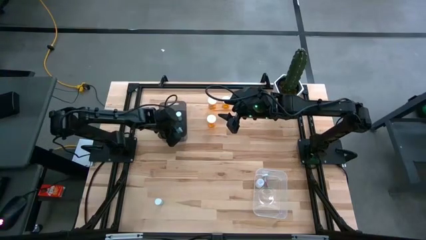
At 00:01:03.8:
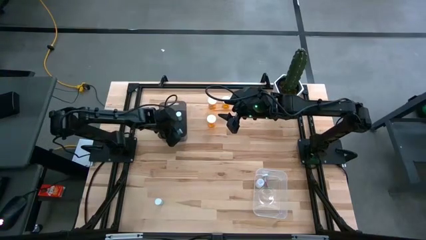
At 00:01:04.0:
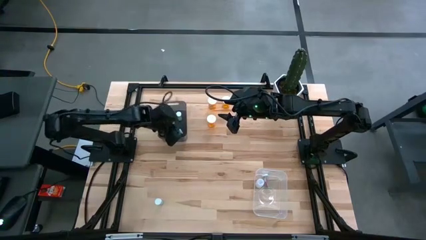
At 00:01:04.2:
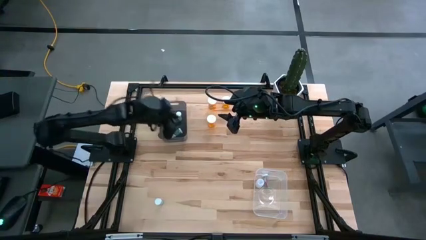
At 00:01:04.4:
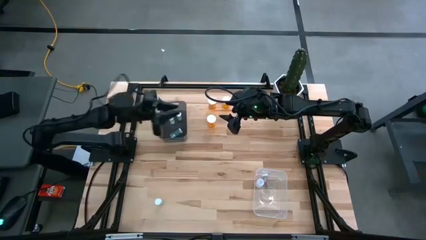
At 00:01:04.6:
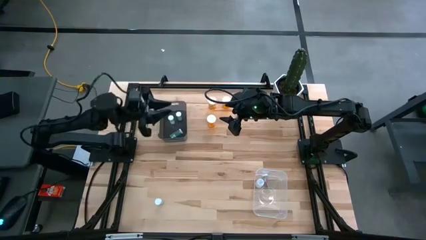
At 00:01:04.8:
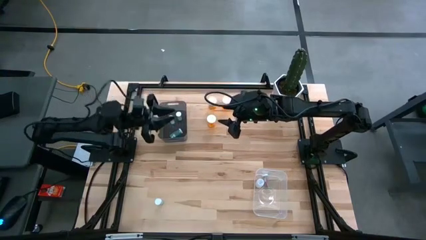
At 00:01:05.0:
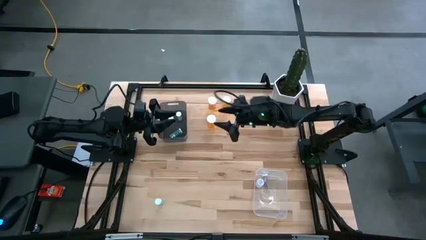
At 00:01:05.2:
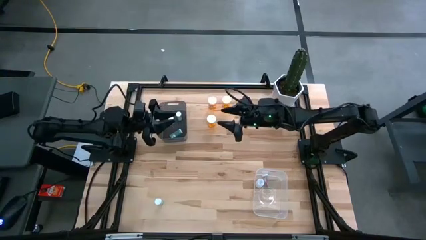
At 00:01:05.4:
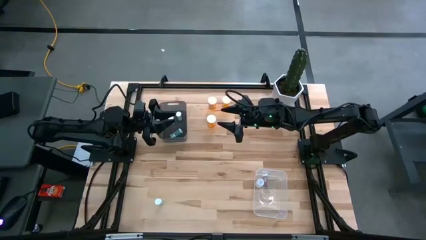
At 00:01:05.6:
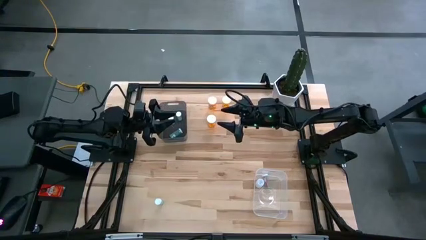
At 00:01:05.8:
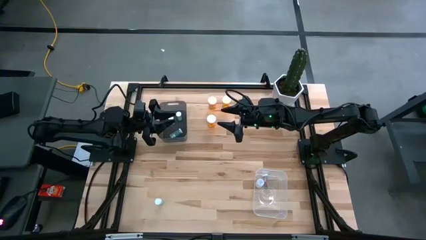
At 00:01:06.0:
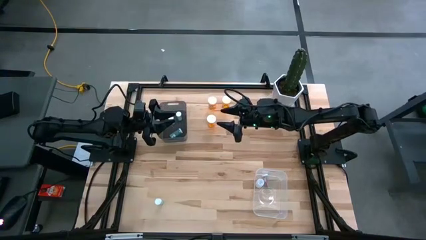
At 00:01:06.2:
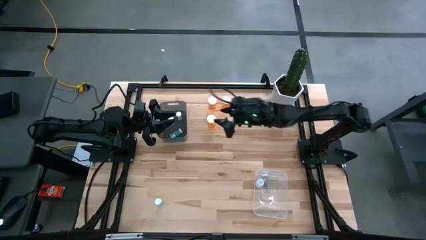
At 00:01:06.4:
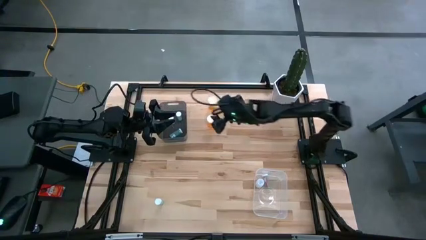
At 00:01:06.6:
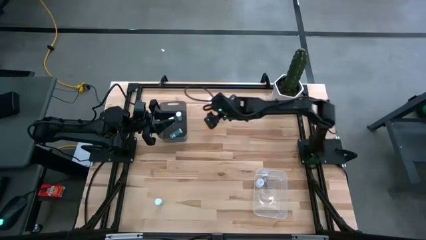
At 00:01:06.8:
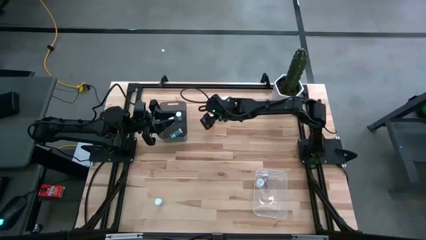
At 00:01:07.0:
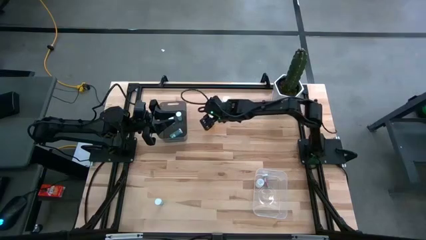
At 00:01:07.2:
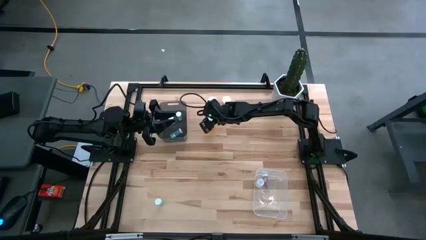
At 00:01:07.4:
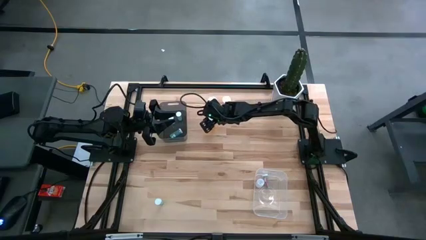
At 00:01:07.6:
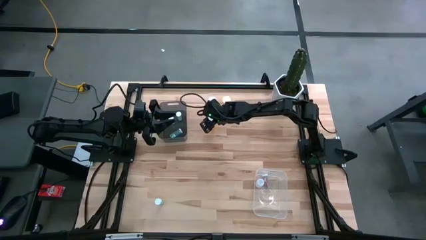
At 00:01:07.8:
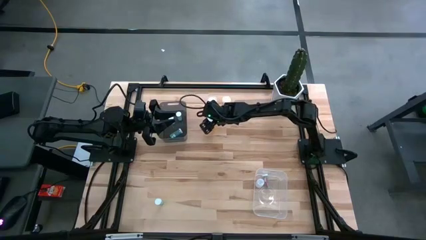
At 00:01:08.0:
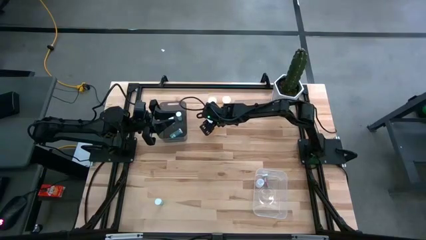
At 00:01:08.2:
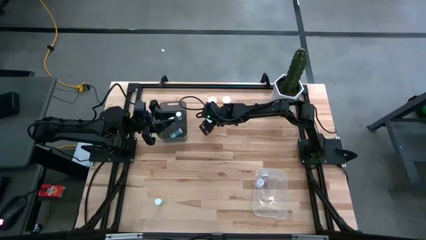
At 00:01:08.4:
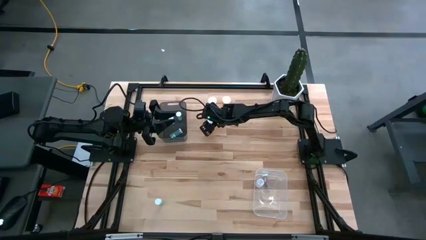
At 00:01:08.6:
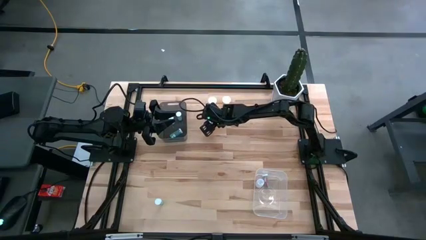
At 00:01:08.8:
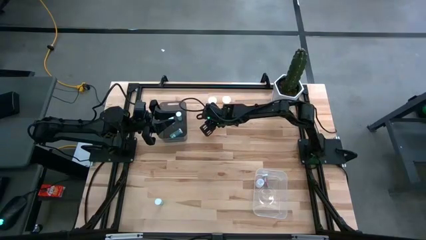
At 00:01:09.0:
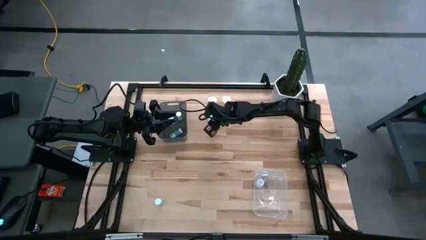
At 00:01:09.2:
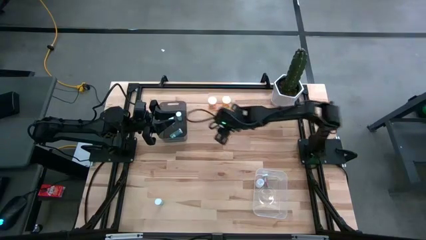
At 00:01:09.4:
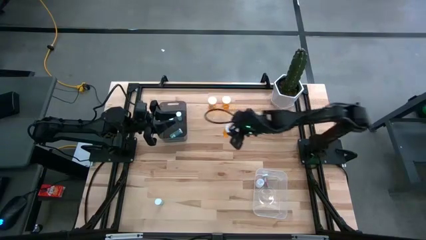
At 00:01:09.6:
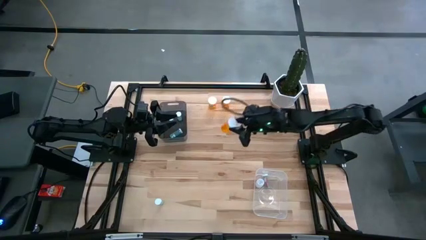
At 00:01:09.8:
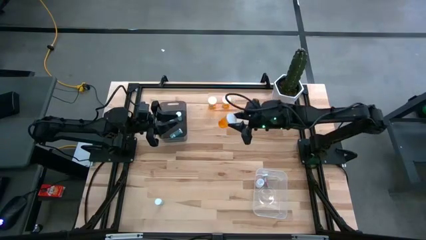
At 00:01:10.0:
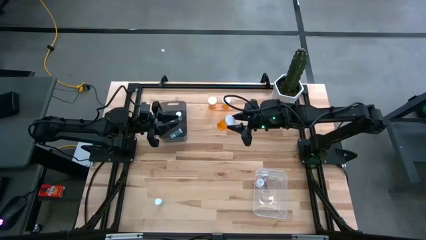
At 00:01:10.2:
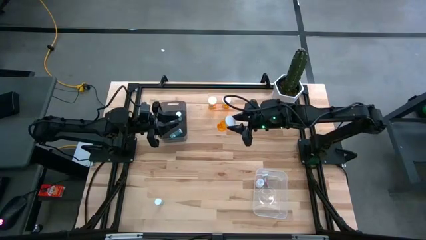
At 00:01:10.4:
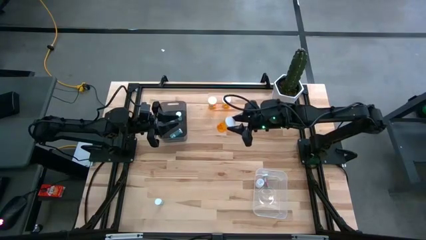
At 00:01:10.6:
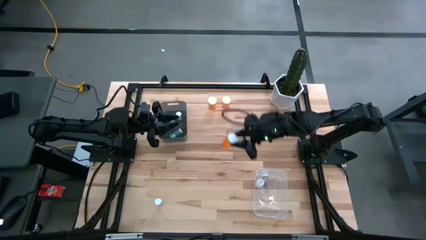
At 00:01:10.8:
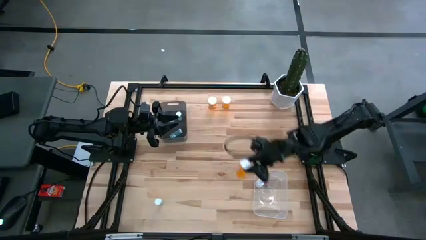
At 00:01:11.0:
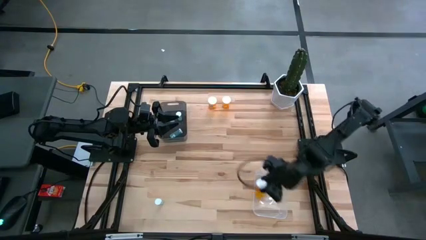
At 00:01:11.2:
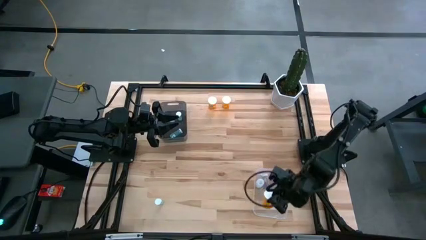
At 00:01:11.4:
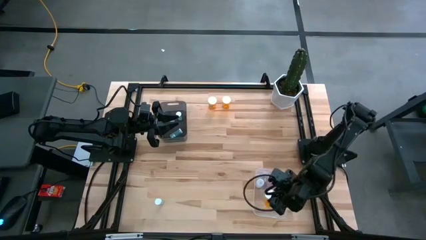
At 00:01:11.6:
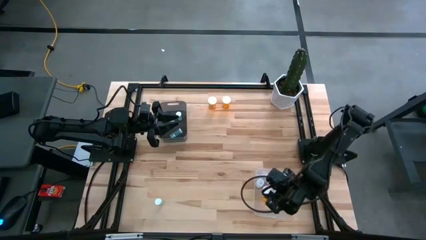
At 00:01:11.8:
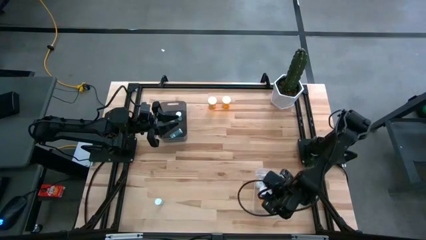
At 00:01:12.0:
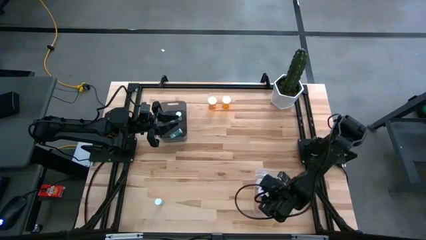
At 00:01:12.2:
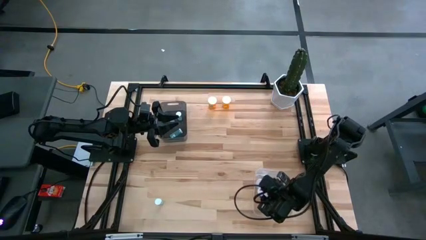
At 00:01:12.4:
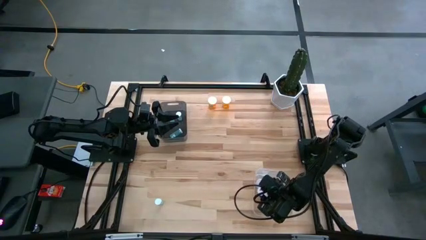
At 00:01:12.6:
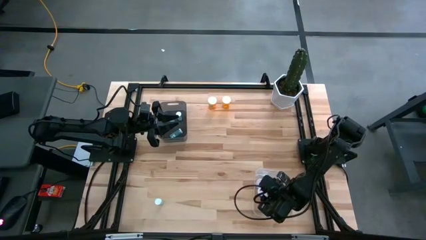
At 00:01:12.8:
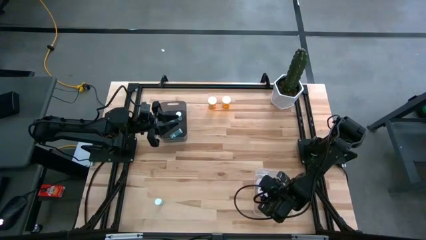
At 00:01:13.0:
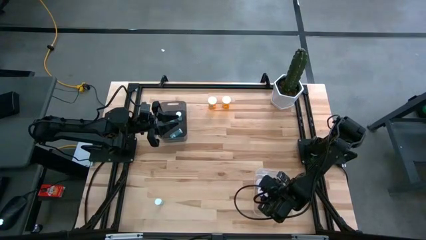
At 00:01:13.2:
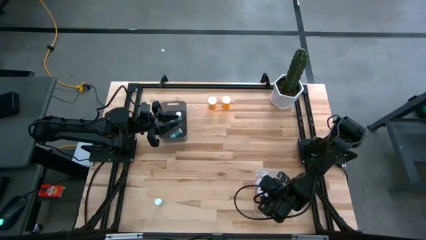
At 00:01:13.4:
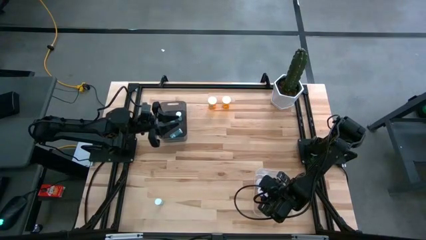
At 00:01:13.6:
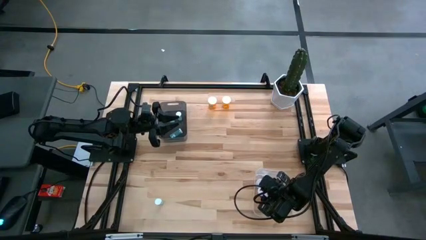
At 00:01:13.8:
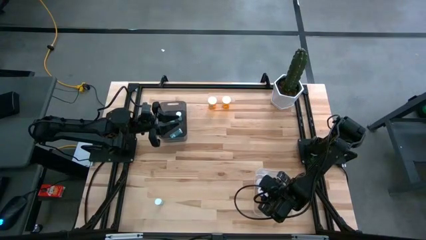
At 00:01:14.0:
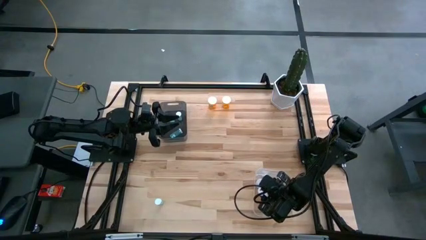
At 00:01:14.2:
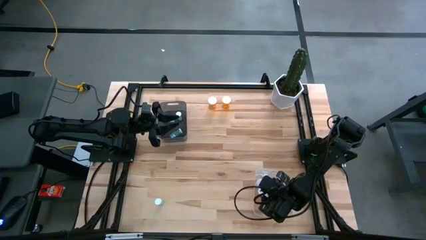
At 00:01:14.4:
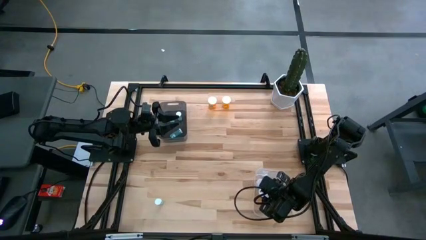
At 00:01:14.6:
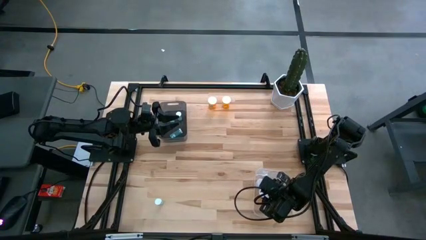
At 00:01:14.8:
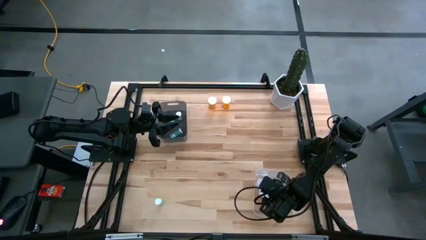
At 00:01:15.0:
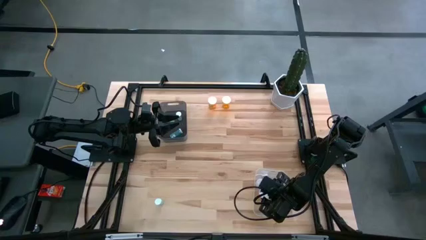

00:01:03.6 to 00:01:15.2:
Task: Pick and place medicine bottles into bin by pill shape (circle, oval)
Put the large orange medicine bottle into the transparent bin
